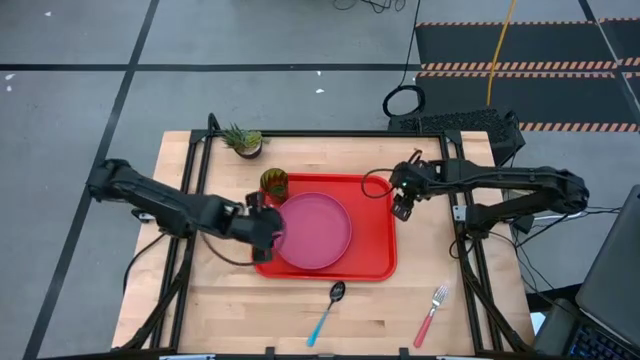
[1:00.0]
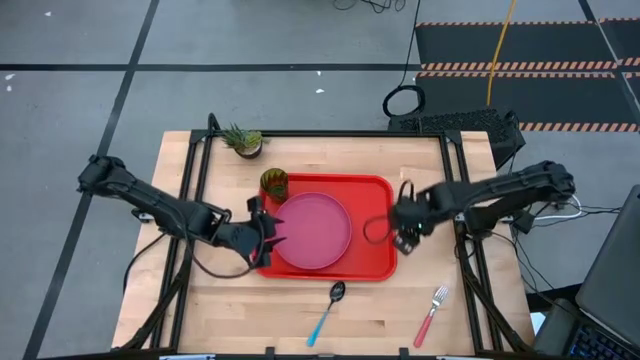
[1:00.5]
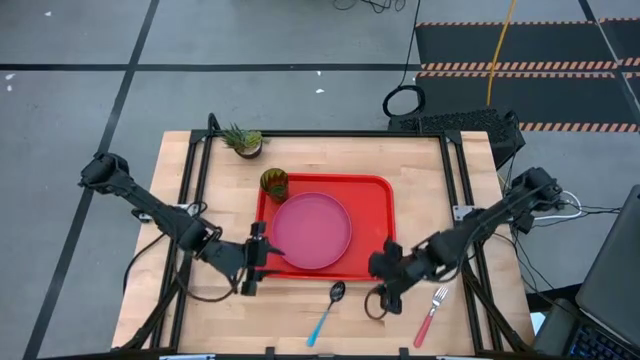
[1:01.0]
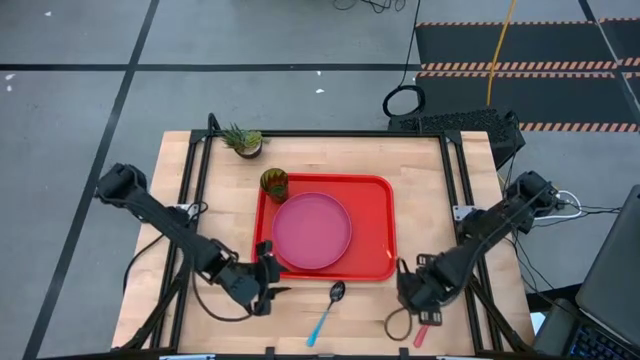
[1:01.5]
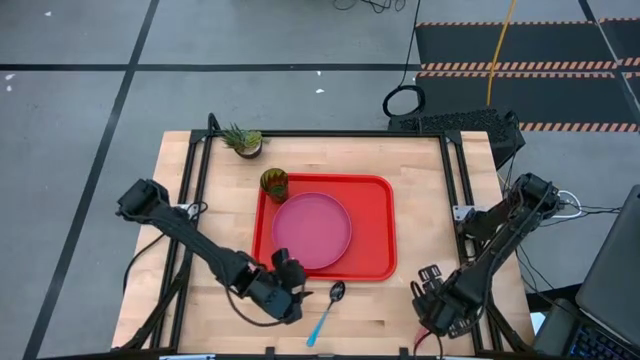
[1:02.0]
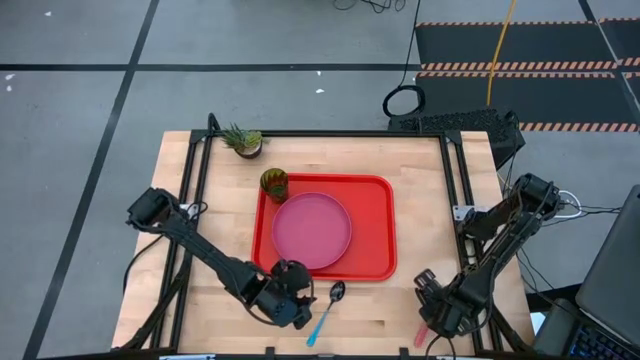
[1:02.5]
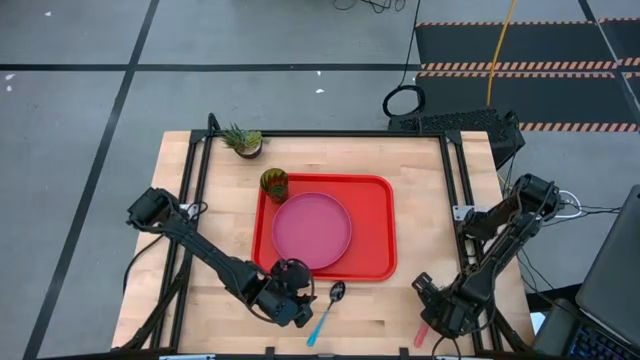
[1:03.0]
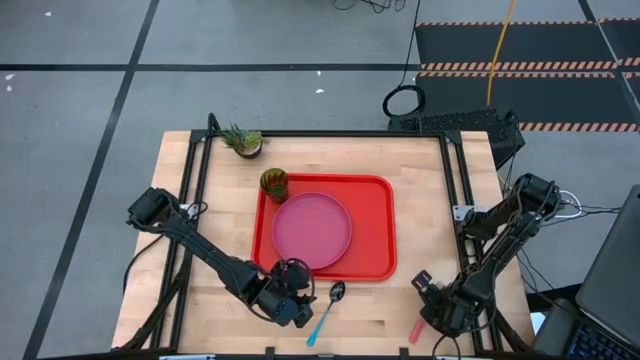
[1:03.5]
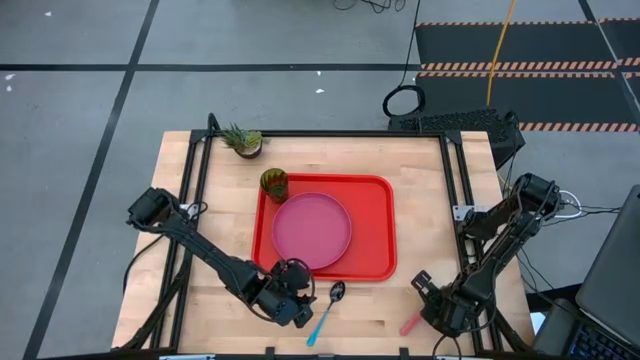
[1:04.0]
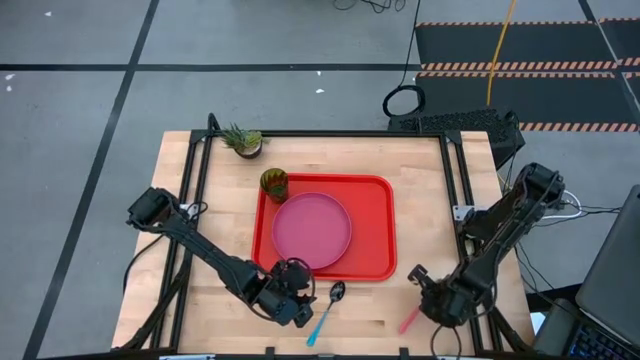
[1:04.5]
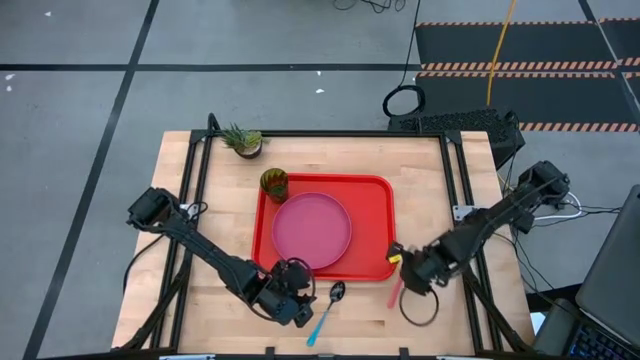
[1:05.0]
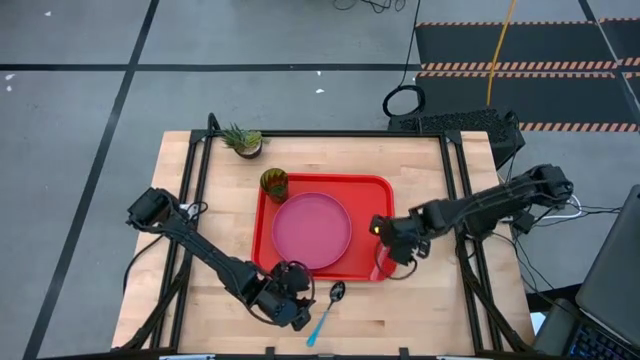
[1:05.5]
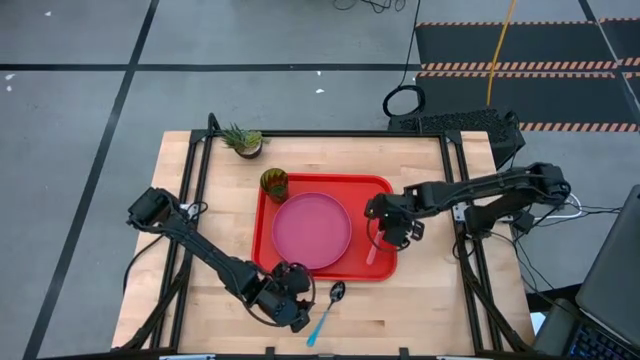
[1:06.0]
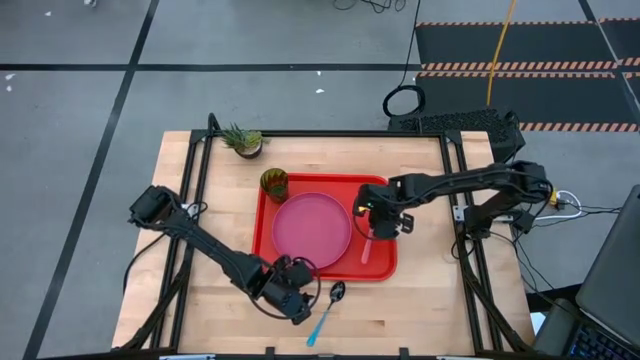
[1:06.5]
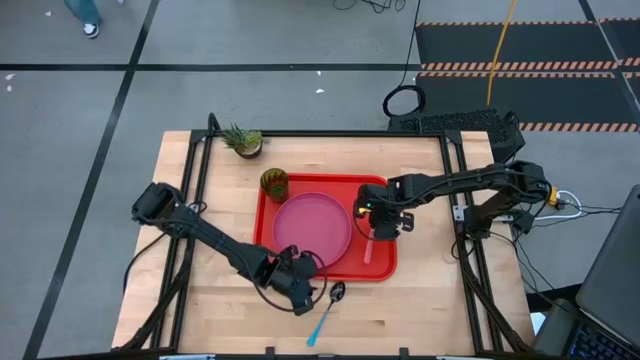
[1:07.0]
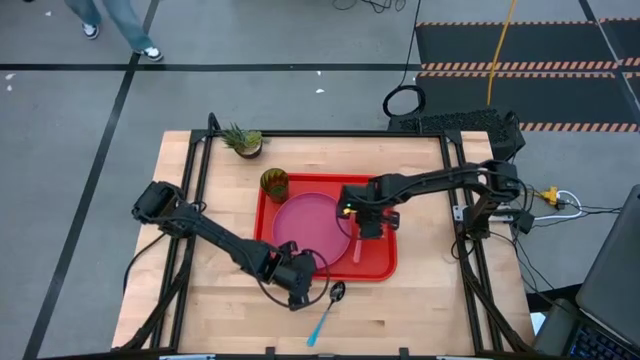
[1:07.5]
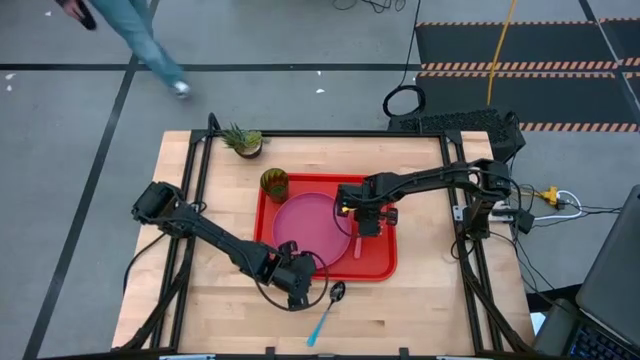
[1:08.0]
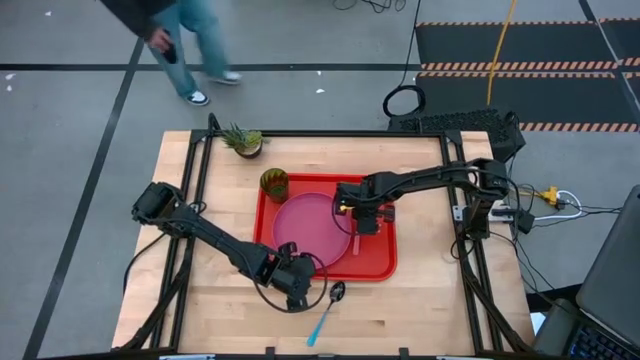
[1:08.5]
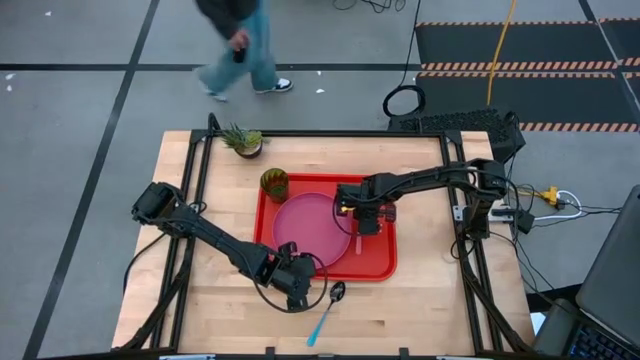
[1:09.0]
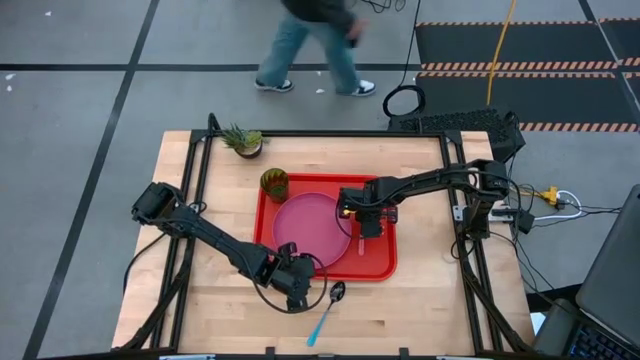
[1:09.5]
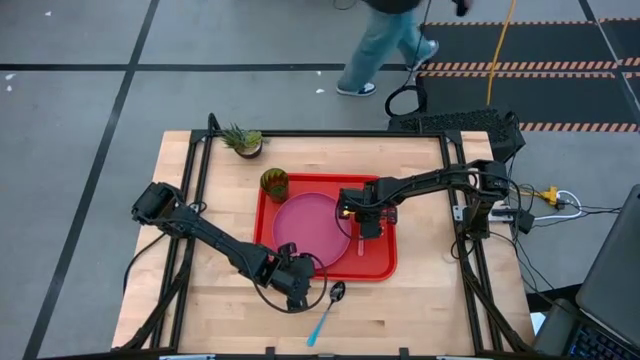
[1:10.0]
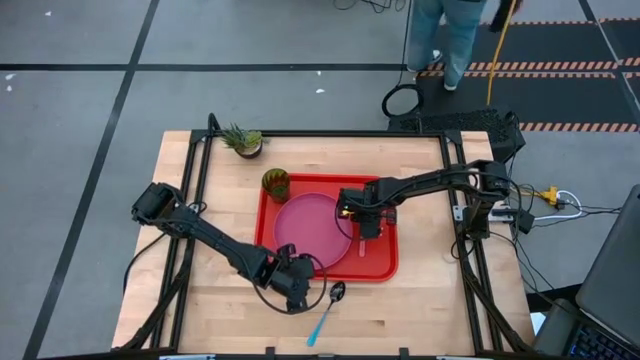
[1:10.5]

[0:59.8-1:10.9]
Task: Pick and place plate/cup/fork/spoon on tray
Put the pink fork on the orange tray to the right of the pink plate

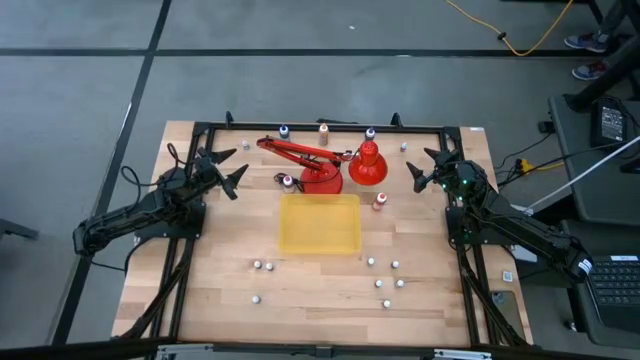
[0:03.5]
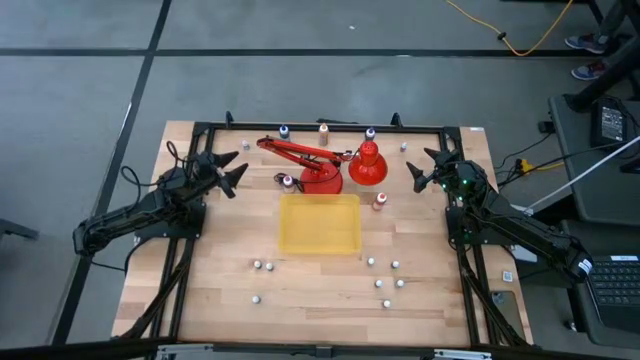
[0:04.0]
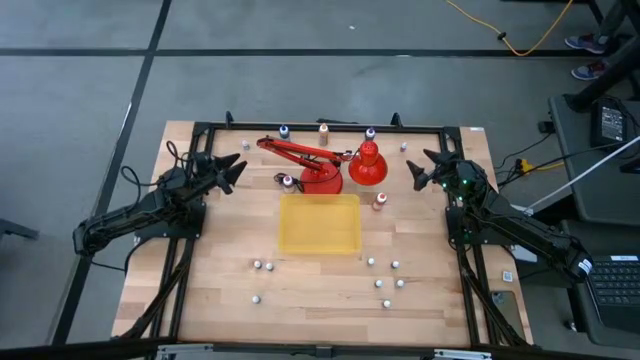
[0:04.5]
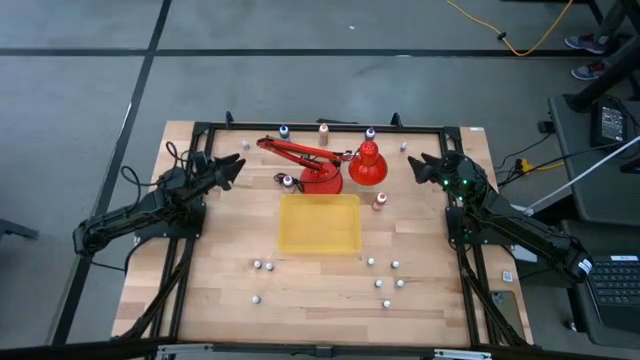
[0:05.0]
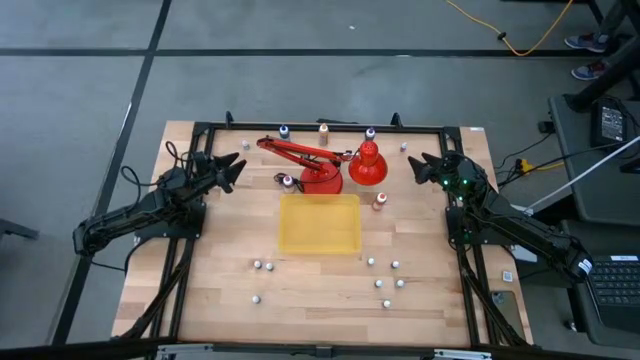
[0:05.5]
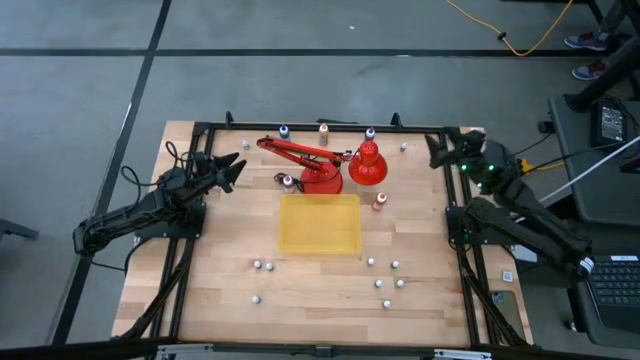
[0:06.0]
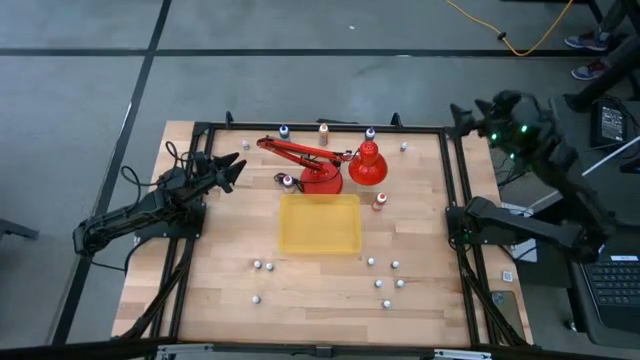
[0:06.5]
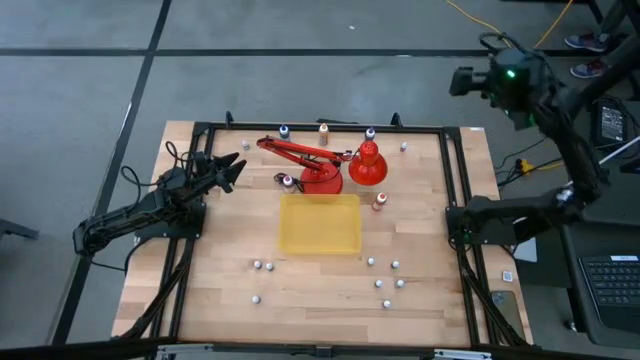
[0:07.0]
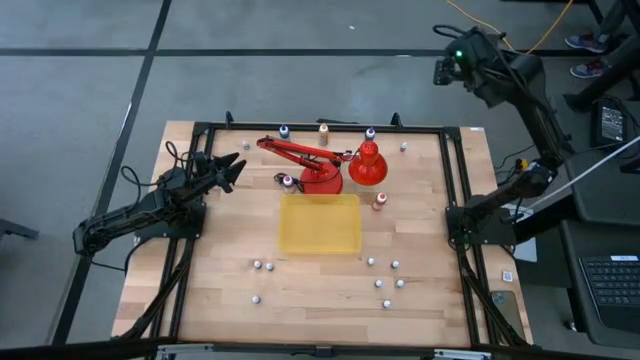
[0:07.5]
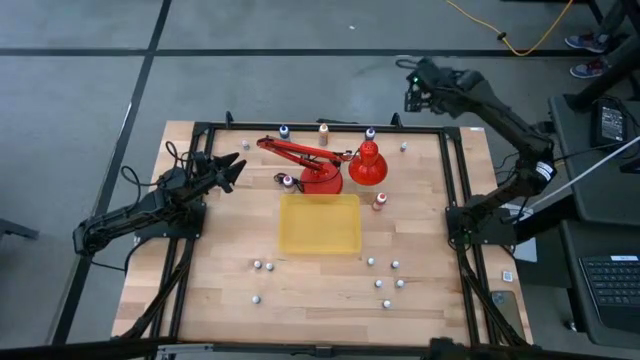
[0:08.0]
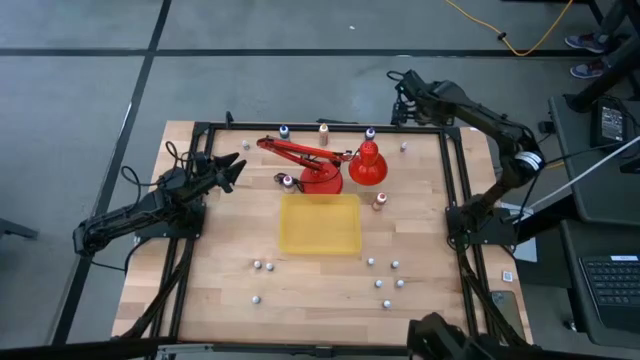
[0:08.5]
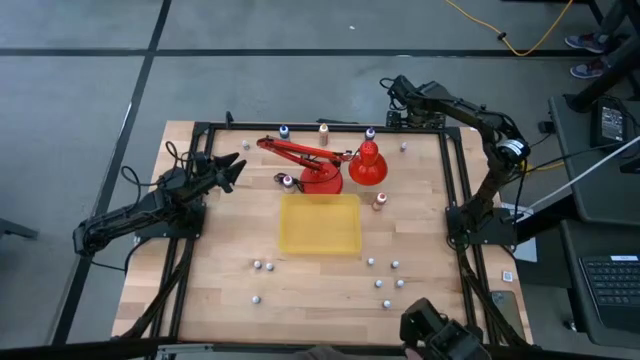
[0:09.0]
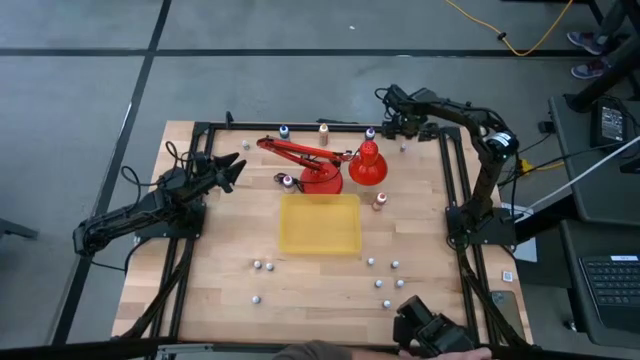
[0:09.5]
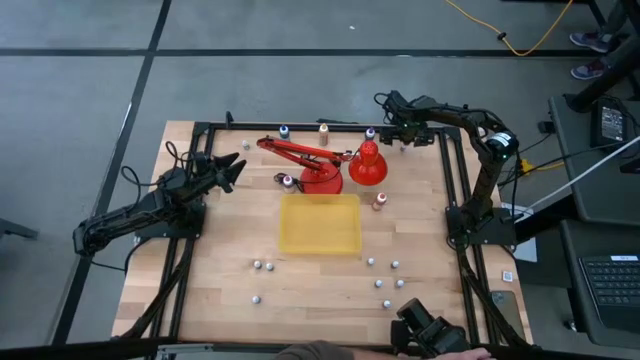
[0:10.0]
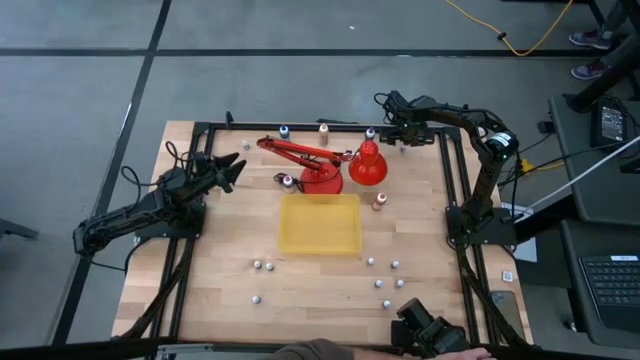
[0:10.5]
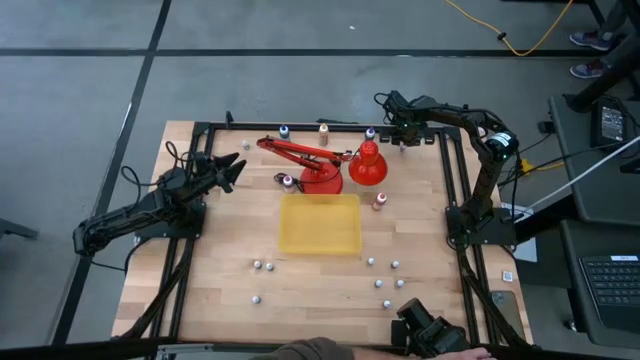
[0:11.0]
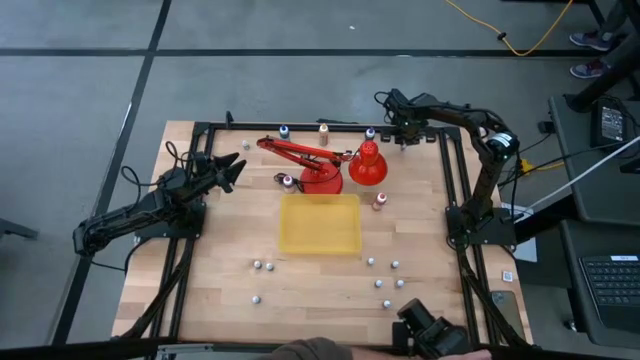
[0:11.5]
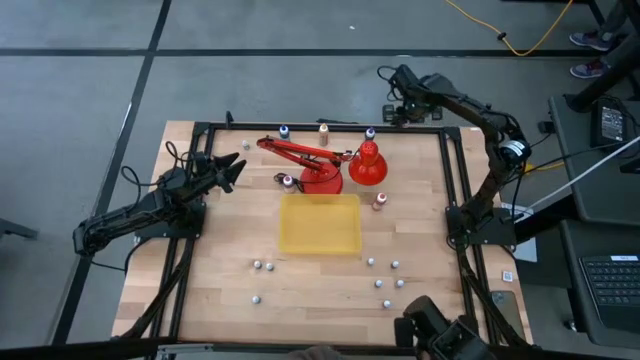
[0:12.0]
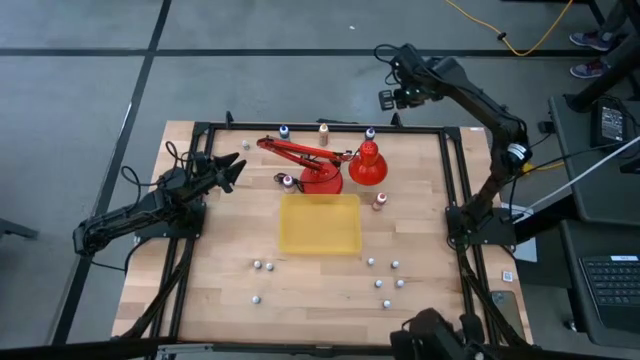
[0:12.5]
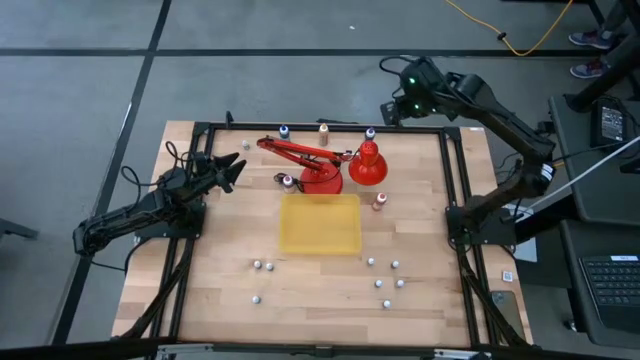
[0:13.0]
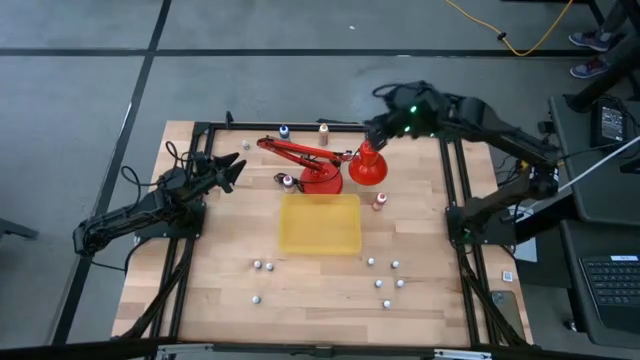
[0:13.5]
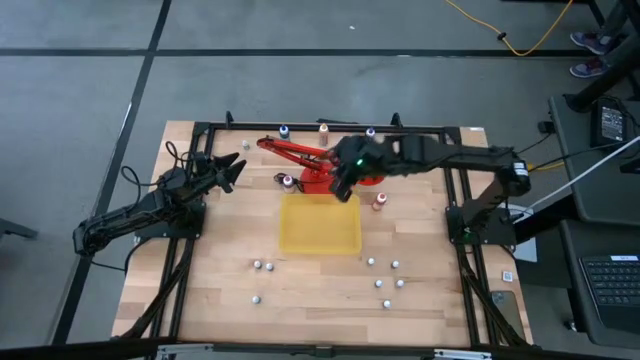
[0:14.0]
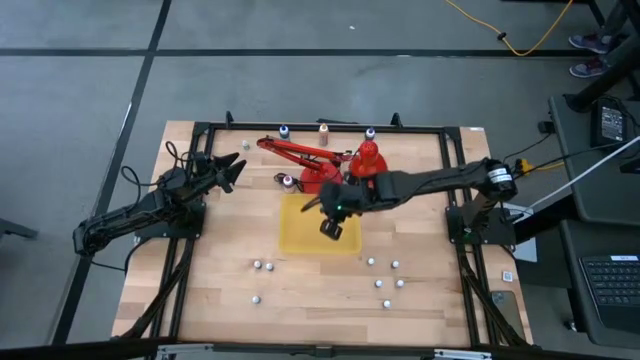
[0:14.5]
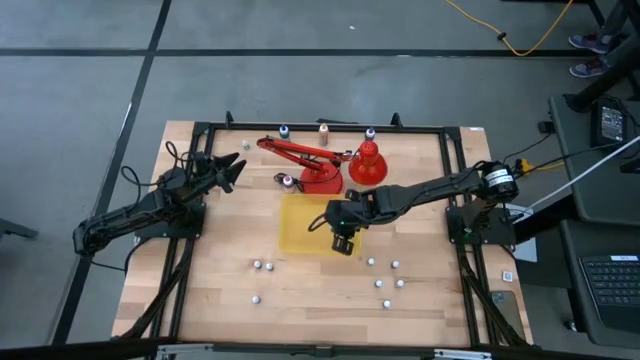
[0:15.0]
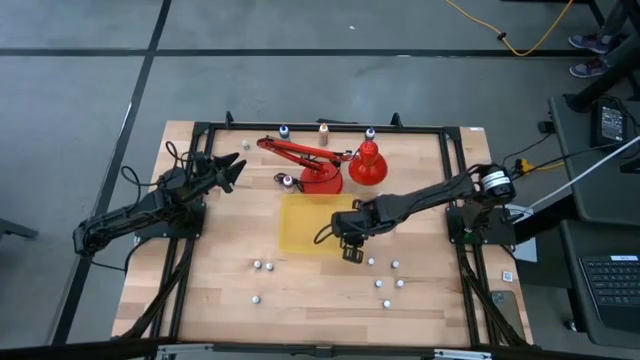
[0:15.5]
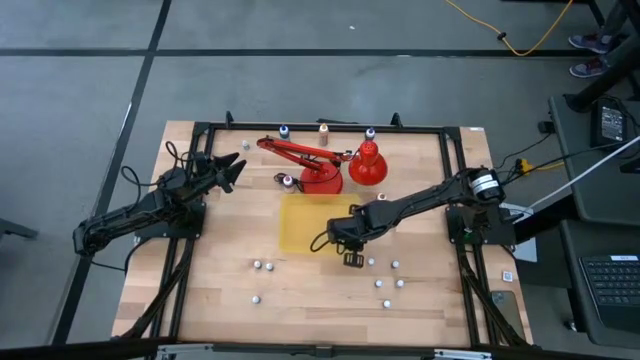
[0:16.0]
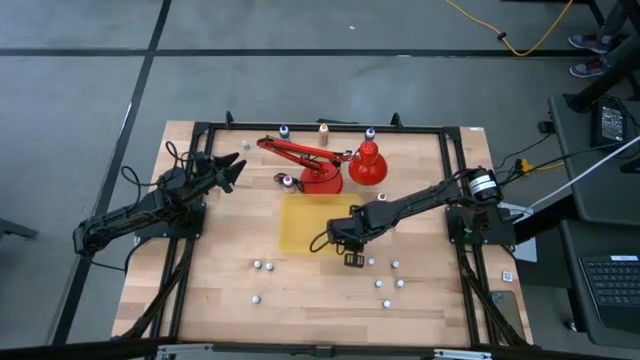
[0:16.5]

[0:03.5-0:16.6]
Task: Pick & Place food coloring
Put the small black food bottle into the yellow bin
